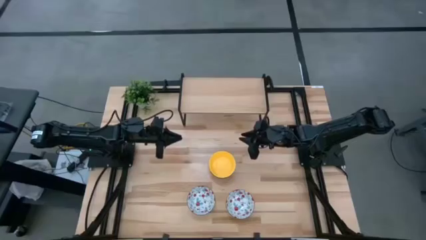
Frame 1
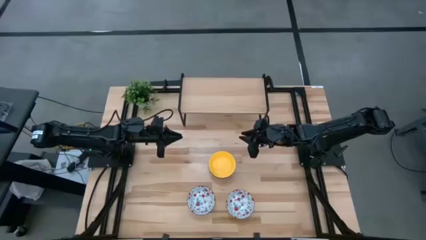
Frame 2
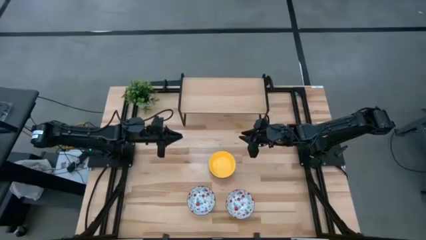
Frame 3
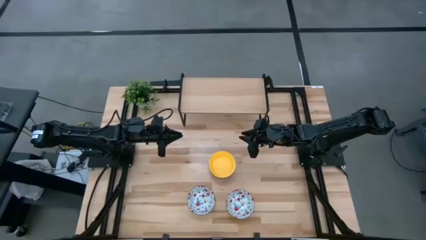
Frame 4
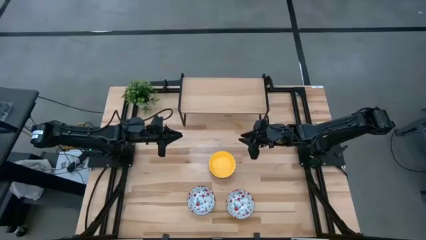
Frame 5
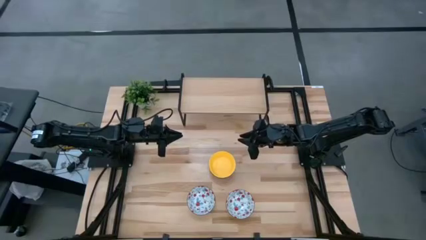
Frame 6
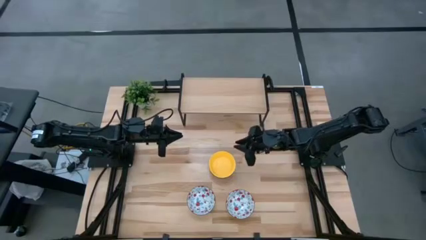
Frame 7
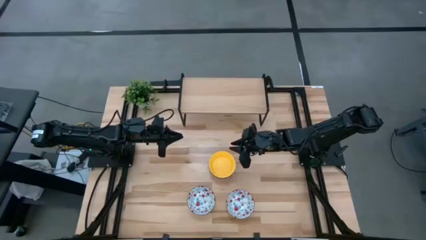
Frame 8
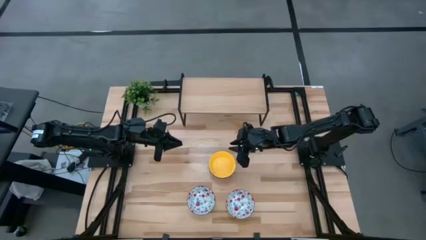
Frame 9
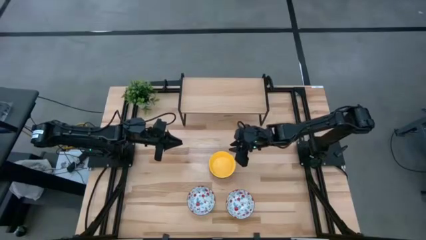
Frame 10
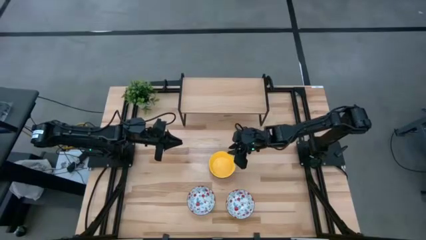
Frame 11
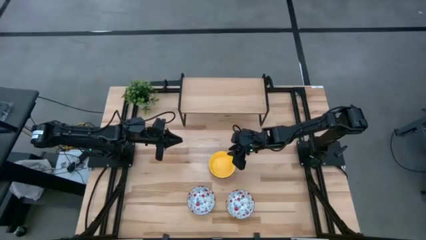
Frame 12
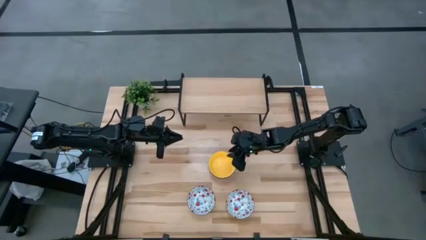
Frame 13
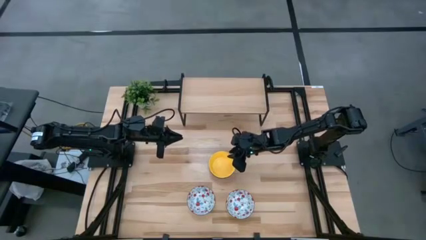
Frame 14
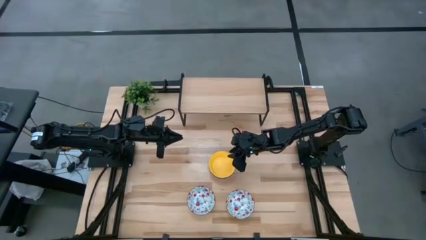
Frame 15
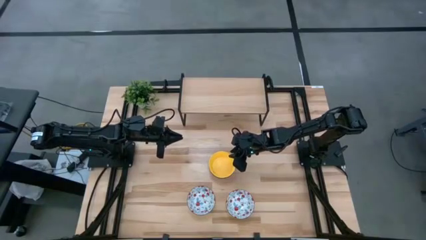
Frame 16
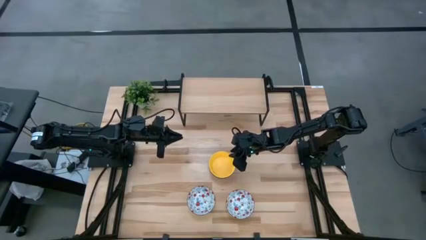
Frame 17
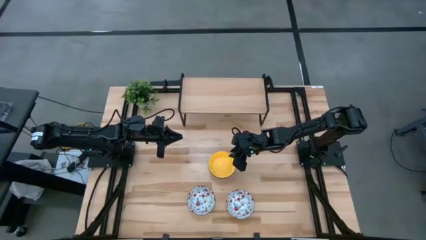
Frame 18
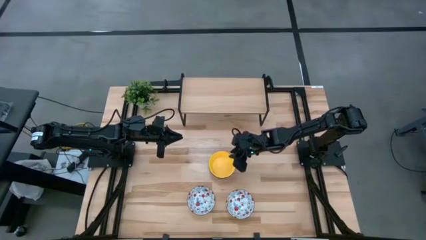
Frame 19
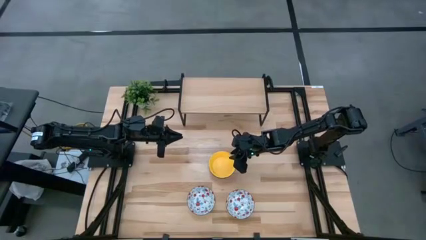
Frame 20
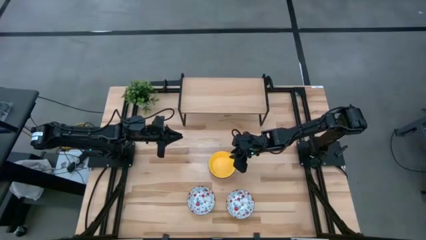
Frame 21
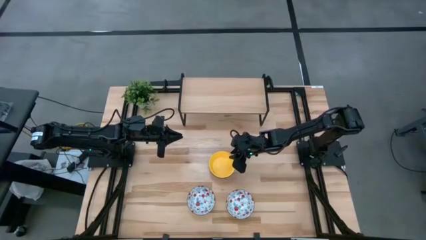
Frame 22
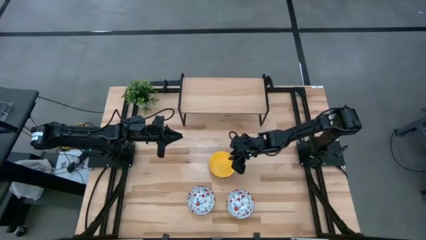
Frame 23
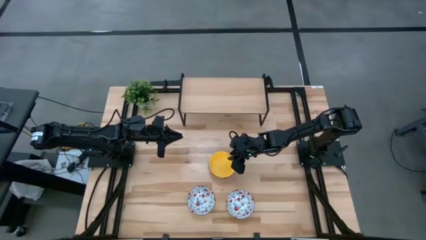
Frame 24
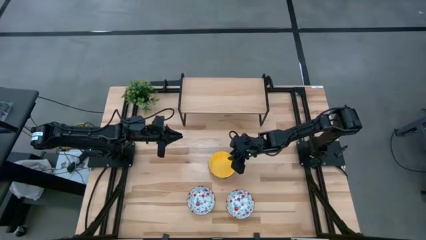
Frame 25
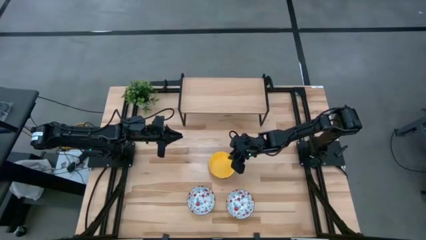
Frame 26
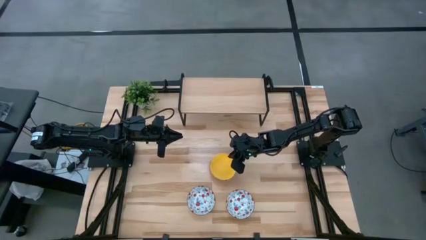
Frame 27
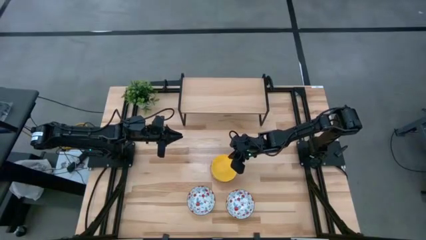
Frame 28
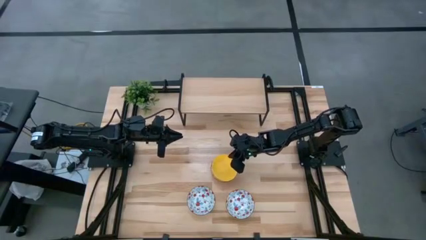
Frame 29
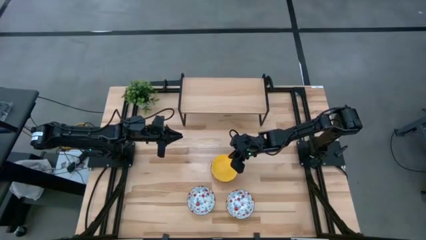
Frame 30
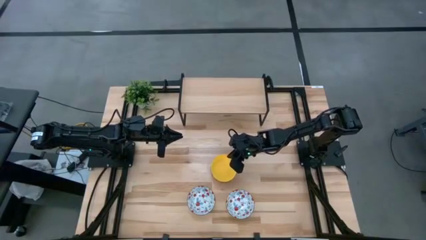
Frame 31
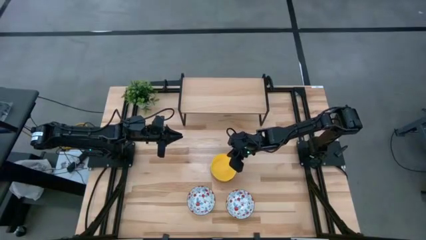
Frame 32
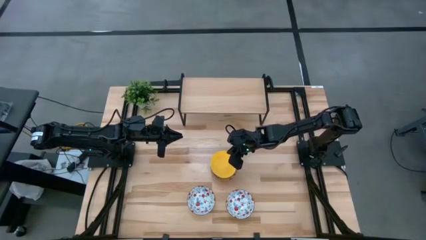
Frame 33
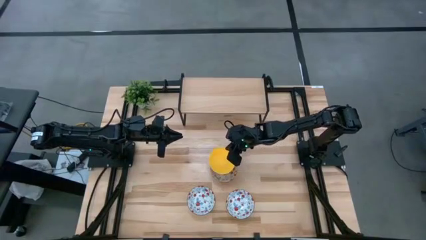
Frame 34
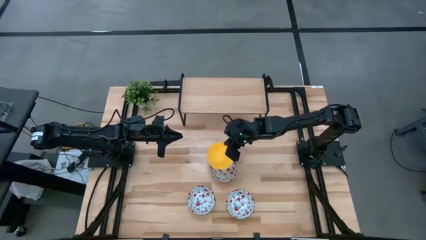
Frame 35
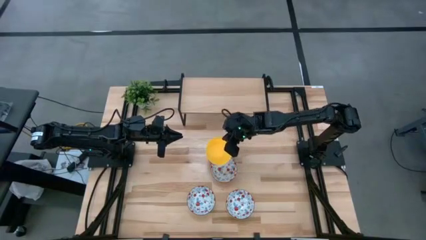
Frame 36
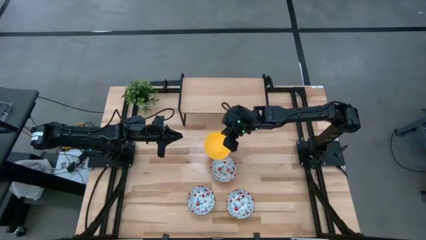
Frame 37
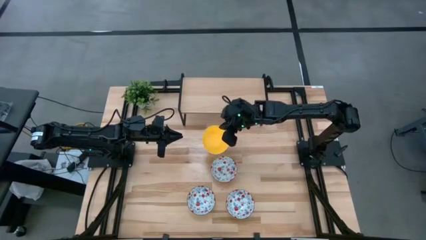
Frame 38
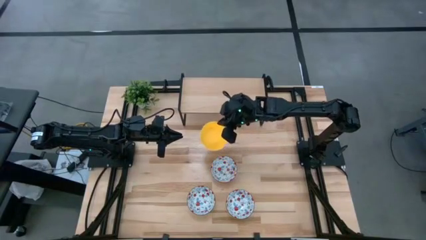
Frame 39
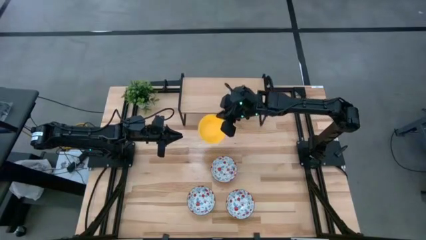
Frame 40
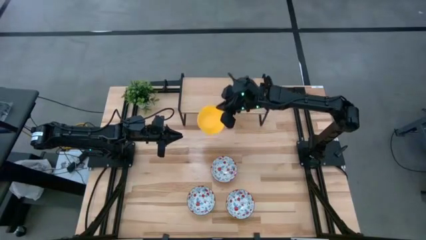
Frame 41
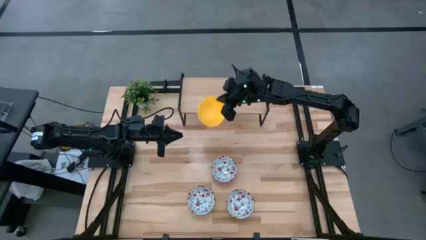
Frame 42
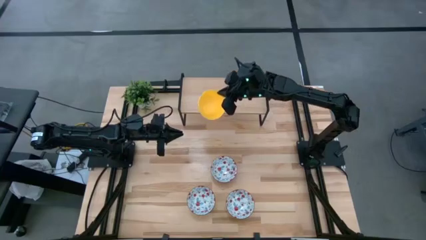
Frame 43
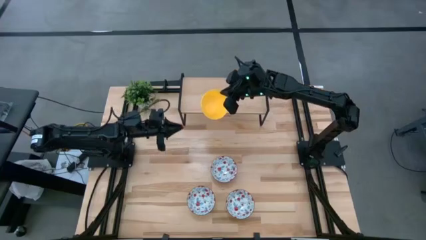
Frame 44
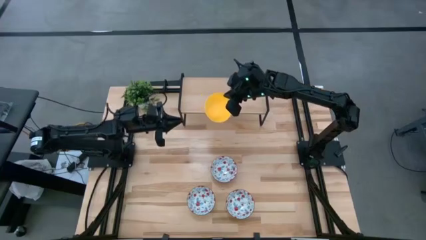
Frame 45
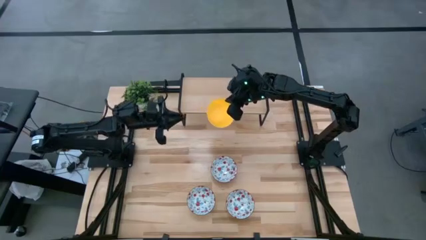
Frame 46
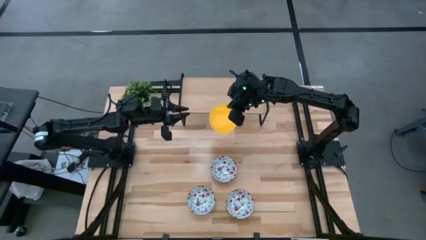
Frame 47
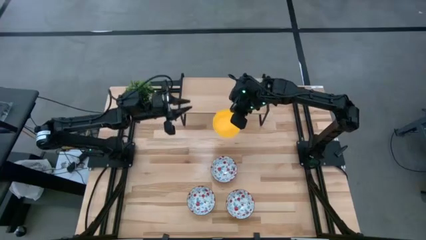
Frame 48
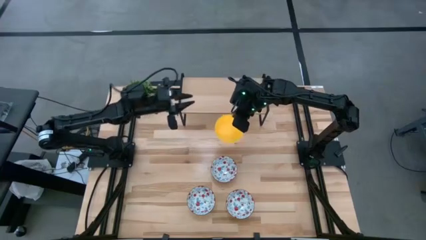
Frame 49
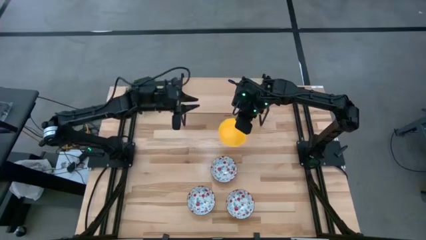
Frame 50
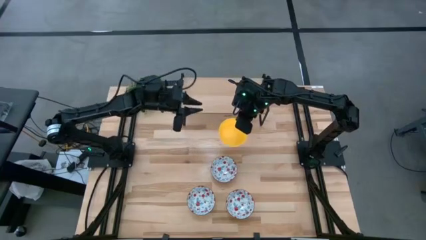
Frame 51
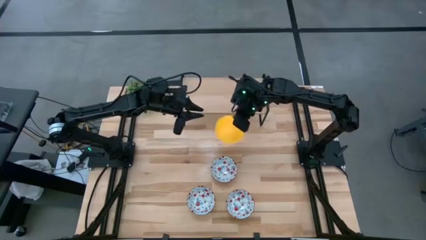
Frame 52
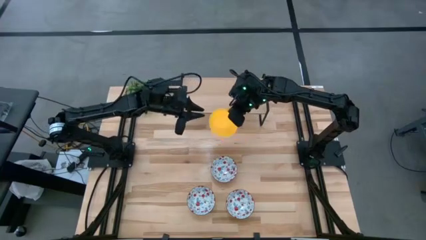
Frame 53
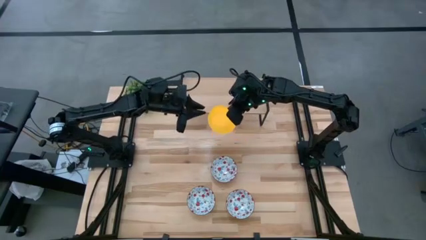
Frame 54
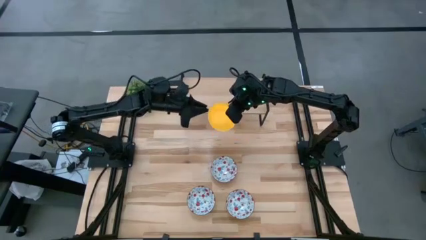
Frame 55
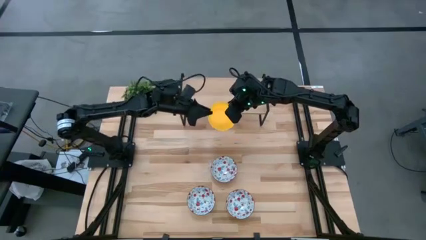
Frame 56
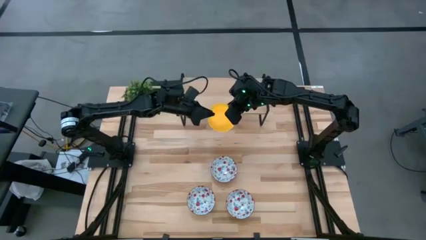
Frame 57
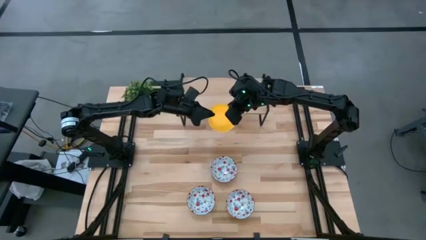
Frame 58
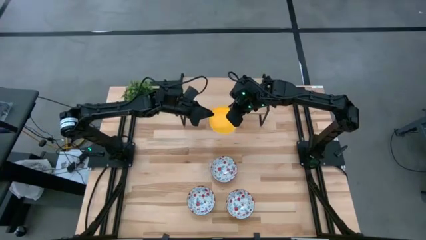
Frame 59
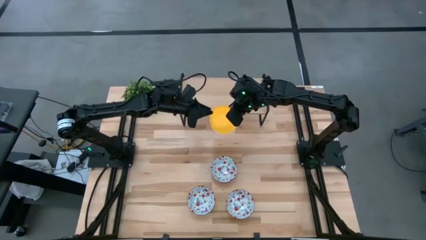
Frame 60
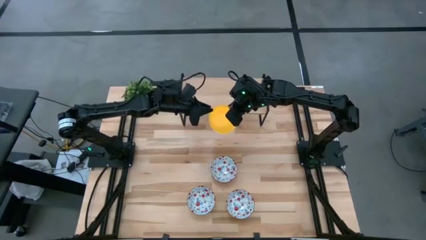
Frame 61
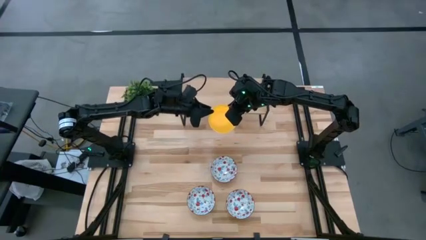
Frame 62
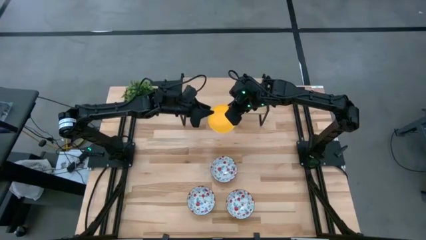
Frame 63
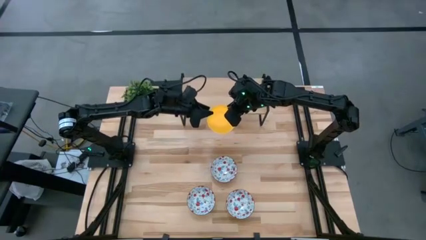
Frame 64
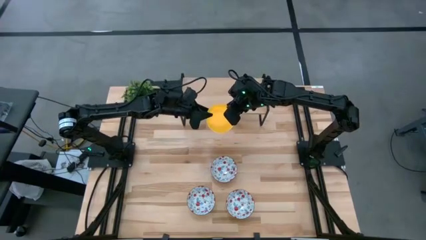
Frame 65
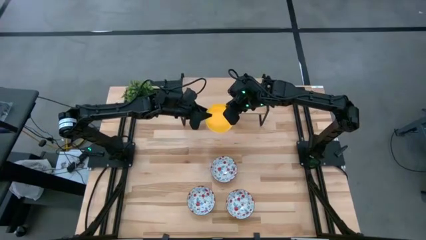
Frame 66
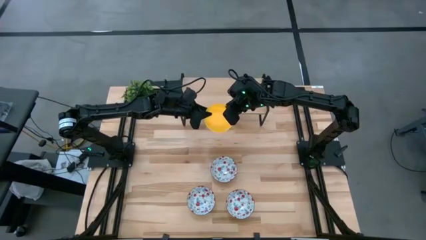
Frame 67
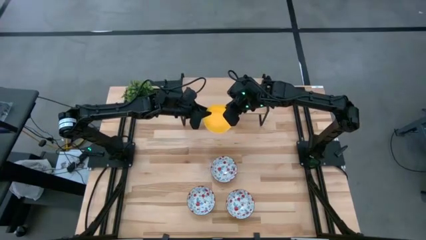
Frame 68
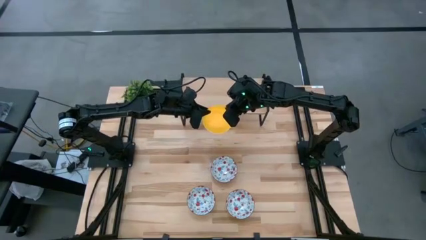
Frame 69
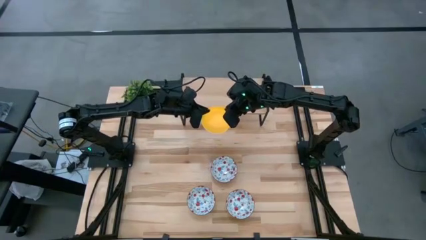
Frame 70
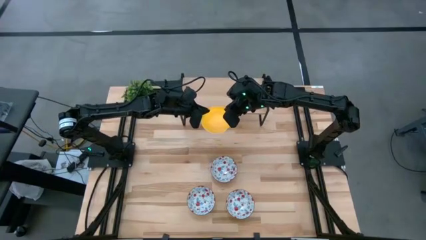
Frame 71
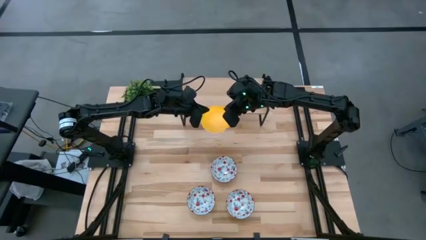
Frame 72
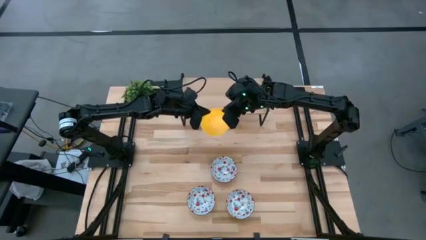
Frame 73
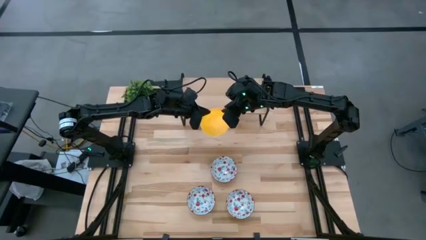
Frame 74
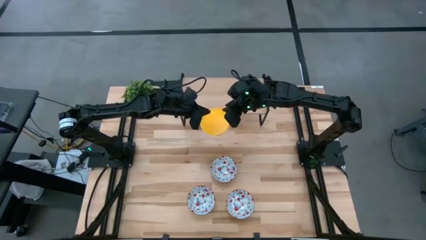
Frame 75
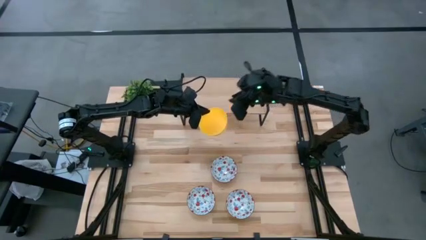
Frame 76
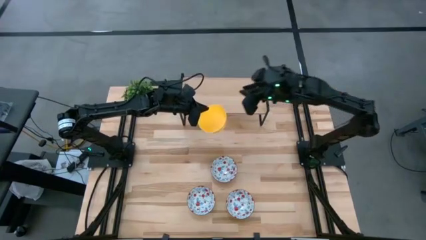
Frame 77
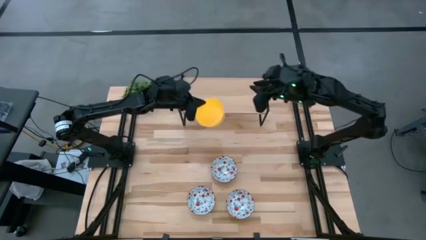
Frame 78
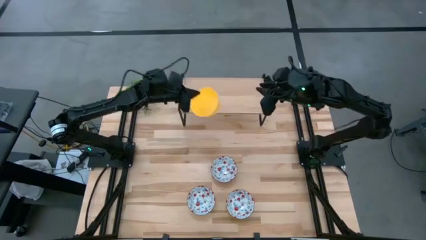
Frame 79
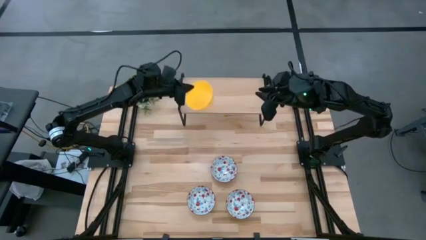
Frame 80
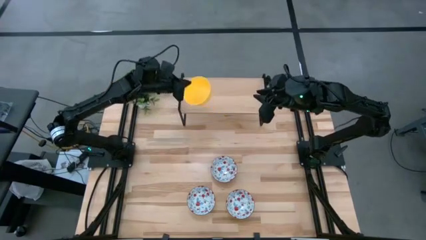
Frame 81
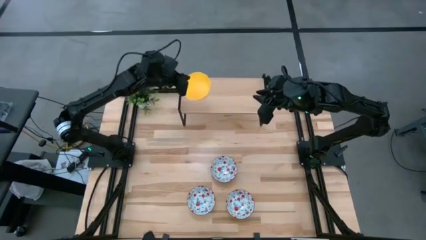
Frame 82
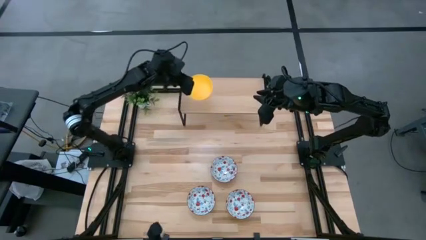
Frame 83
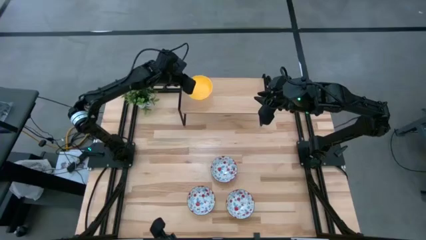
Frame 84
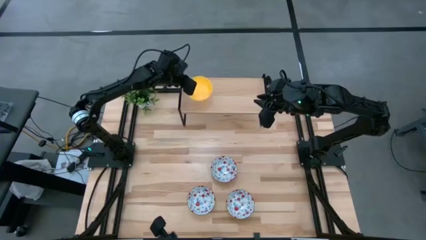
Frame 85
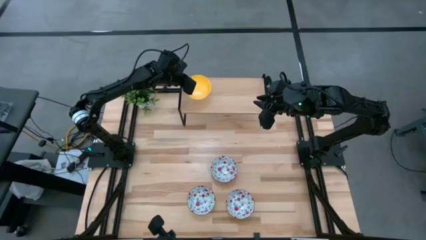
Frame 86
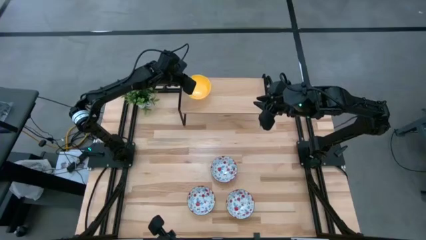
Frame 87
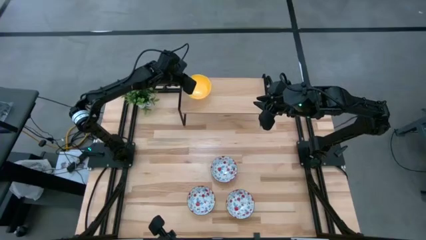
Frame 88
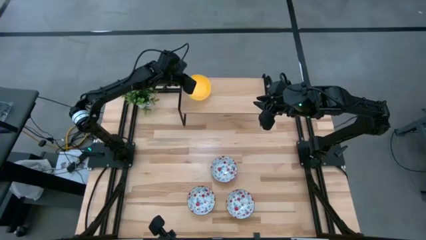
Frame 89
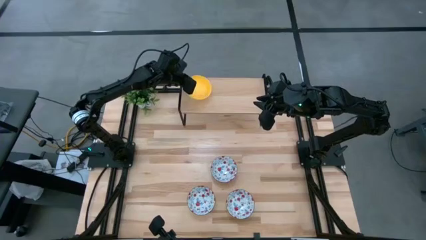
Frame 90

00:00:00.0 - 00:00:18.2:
Task: Pick & Place Mini bowls
Put the top yellow bowl on the shelf
